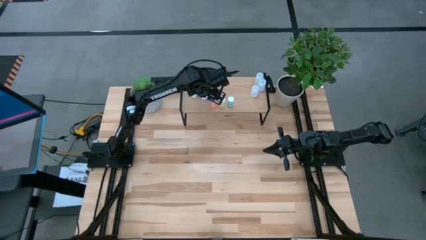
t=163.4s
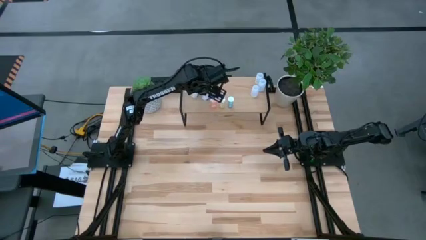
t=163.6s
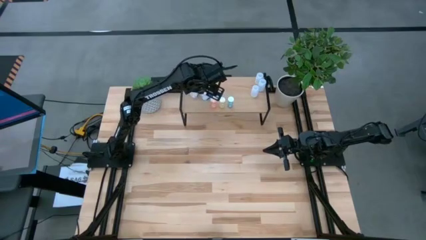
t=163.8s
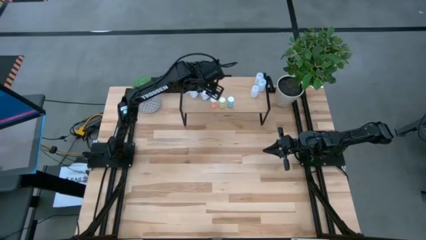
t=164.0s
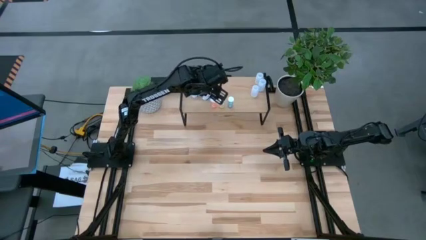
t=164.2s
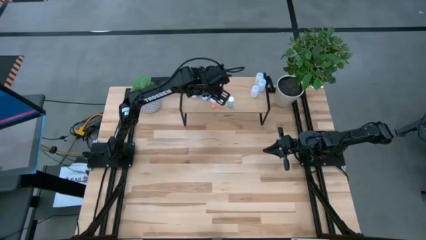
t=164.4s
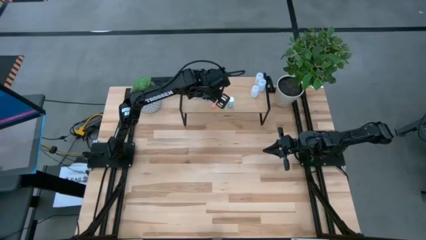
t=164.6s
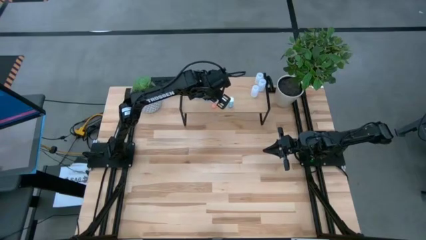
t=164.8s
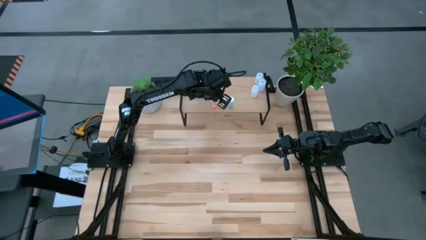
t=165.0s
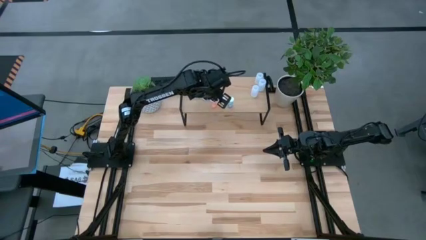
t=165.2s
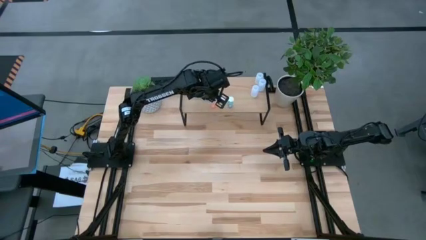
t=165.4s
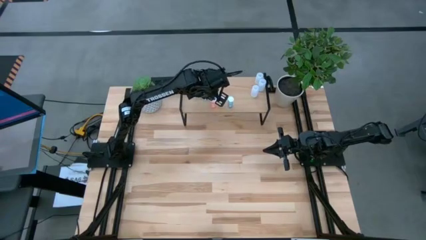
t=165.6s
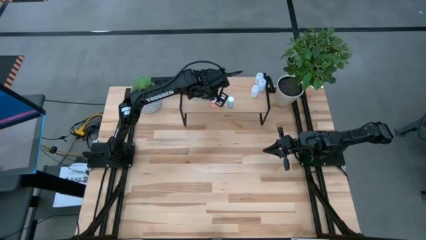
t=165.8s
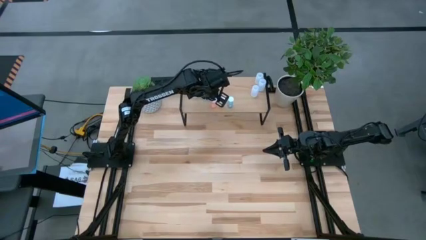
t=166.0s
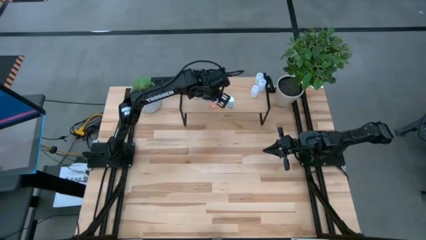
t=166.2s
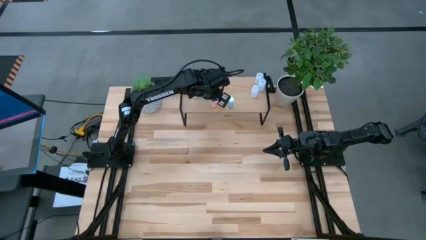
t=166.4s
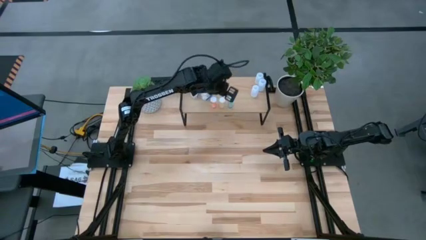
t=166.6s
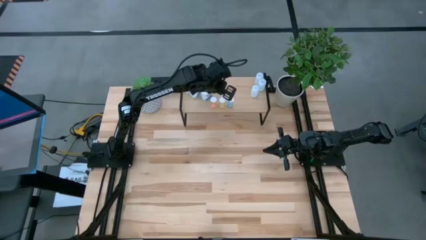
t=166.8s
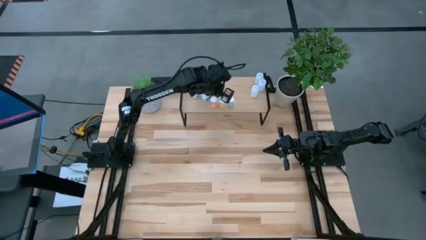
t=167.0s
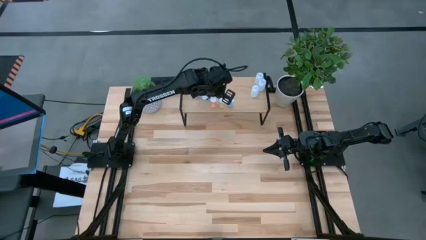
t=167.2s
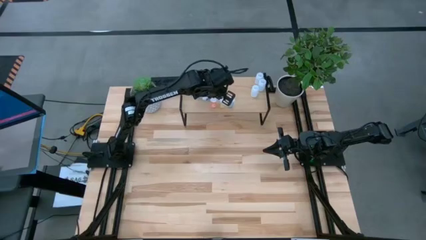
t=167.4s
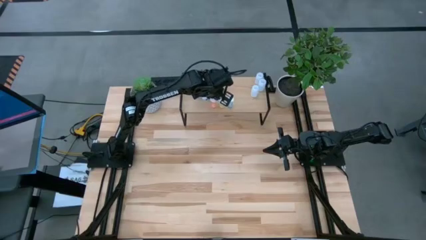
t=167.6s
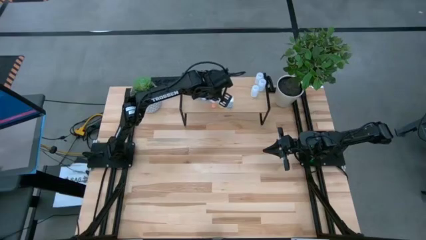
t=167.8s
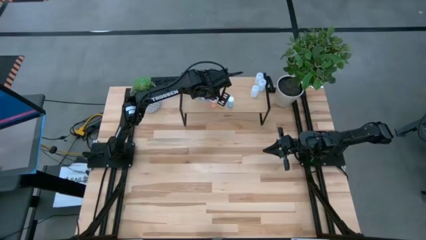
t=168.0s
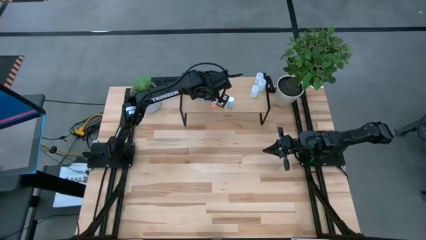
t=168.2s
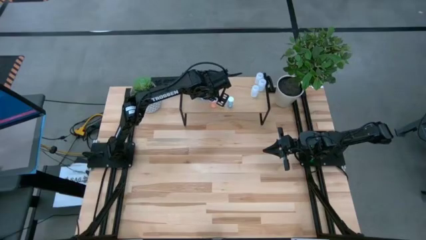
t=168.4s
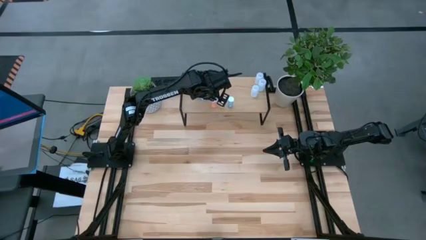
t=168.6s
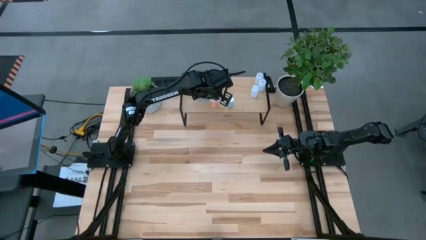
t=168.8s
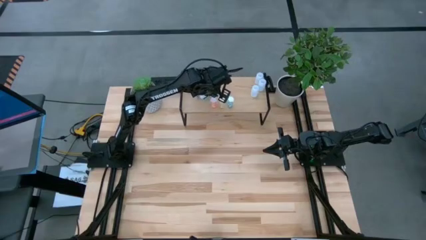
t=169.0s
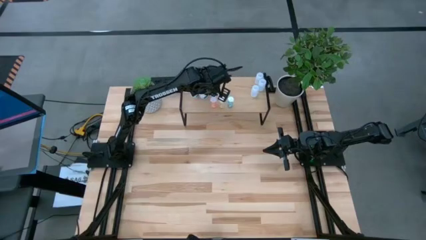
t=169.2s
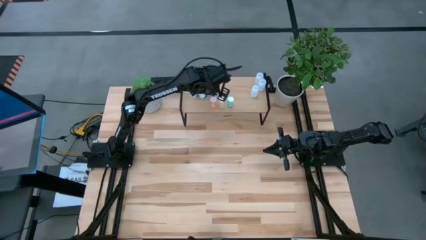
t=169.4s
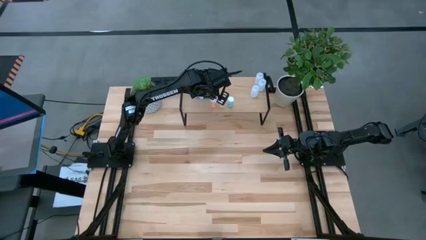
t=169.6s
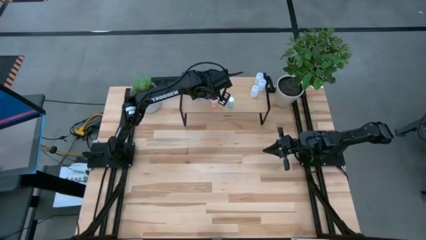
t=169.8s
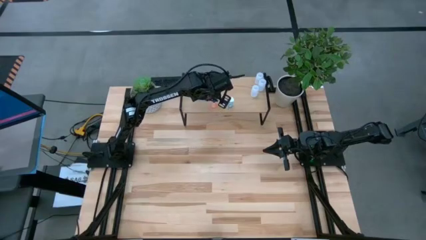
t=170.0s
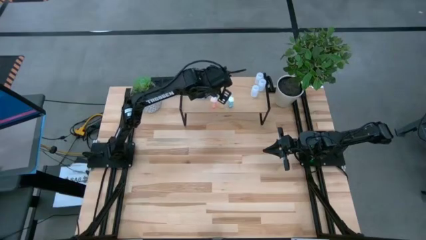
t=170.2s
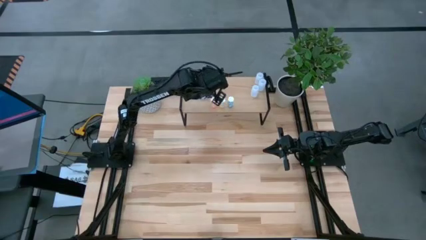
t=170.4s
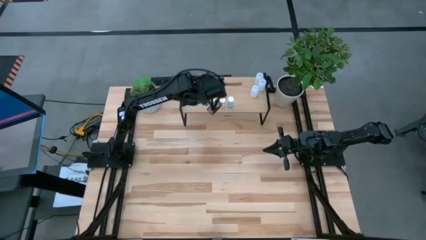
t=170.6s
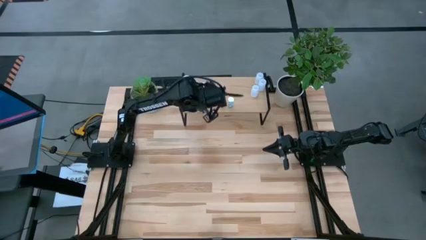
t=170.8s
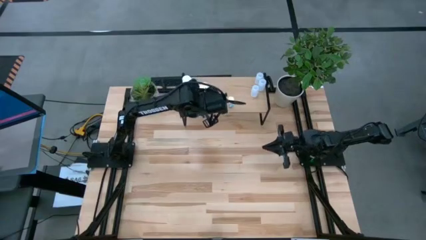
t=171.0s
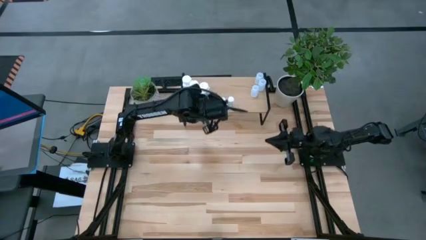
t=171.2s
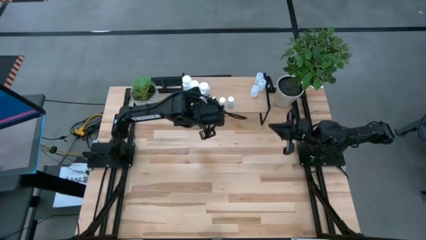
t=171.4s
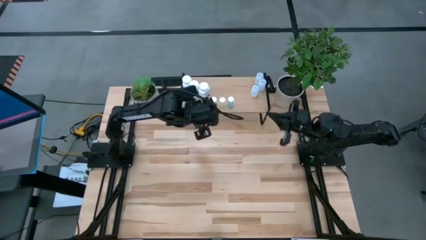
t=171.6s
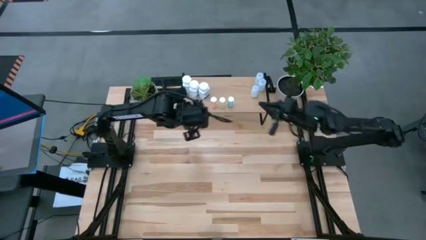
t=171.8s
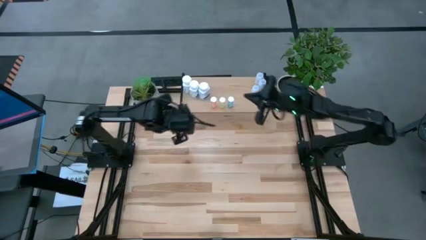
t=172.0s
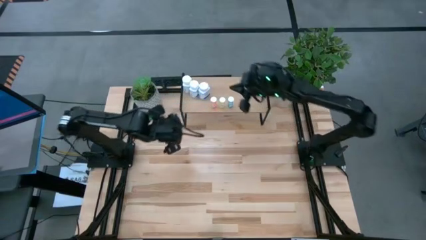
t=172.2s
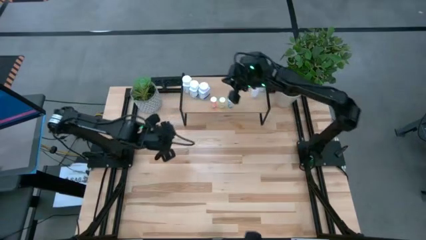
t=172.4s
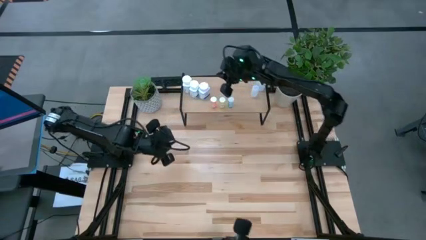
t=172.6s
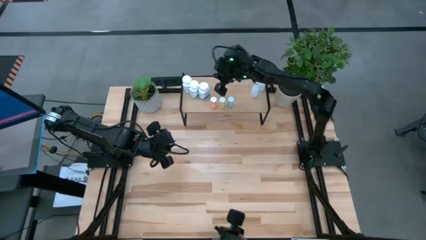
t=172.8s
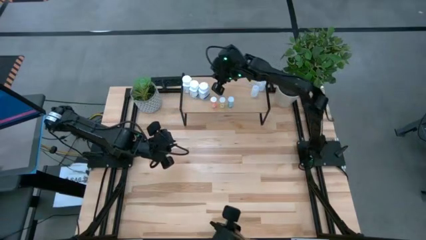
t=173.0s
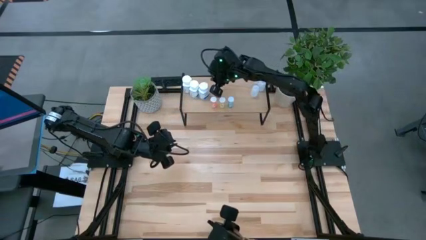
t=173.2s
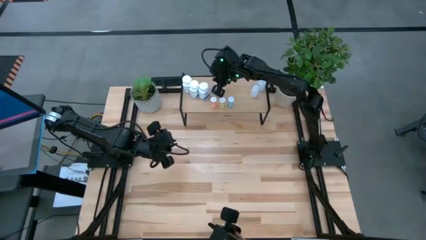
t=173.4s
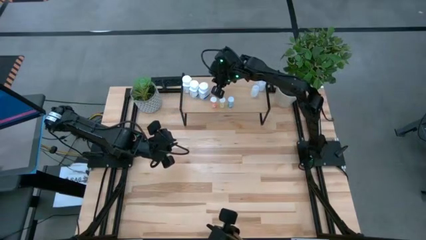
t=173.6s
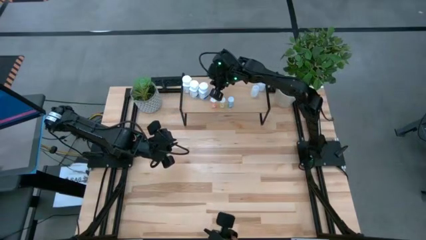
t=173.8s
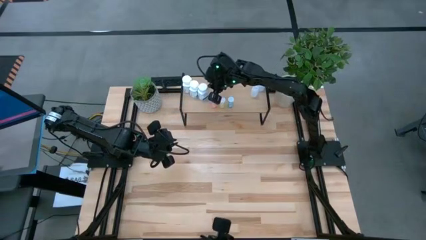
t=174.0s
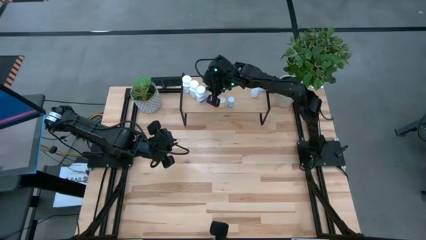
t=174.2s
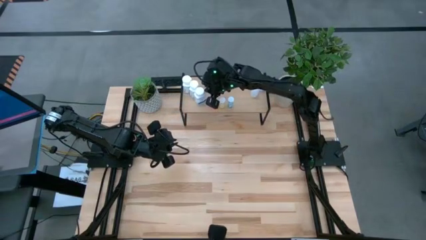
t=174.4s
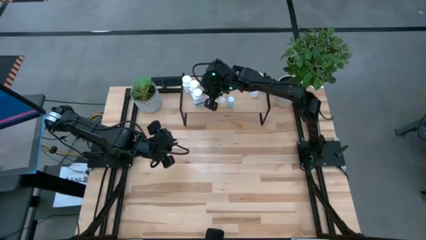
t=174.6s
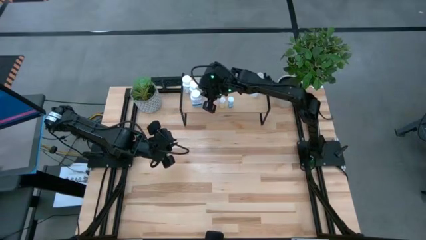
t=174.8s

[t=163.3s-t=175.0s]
Task: Pick and place medicine bottles onto shelf by color
Put the white medicine bottle on the shelf

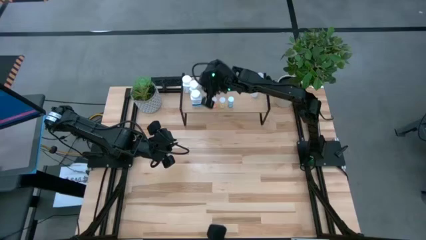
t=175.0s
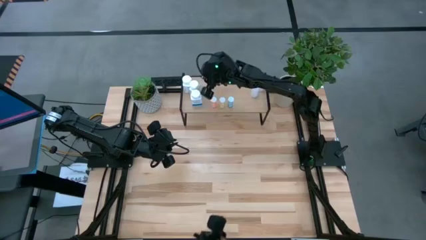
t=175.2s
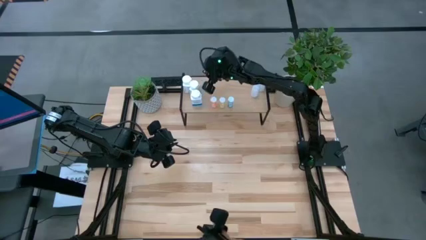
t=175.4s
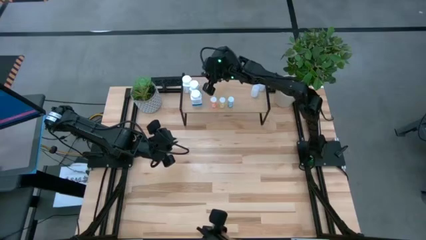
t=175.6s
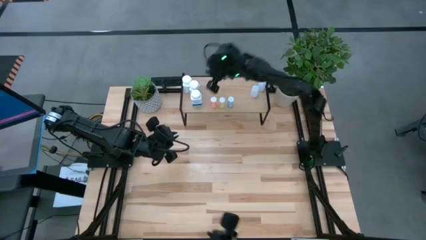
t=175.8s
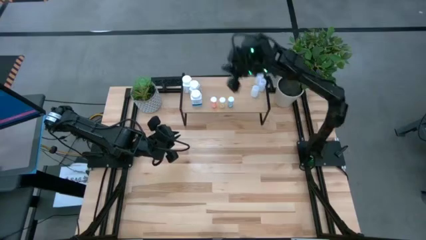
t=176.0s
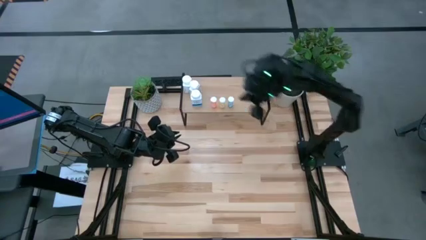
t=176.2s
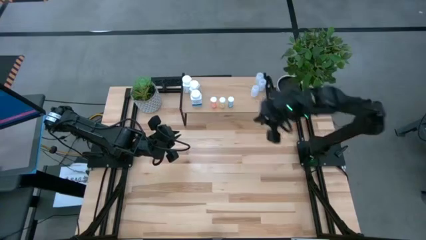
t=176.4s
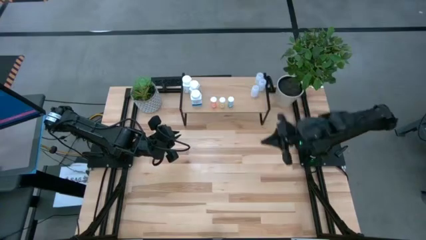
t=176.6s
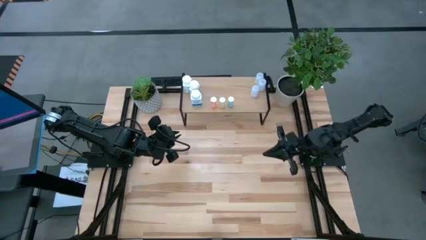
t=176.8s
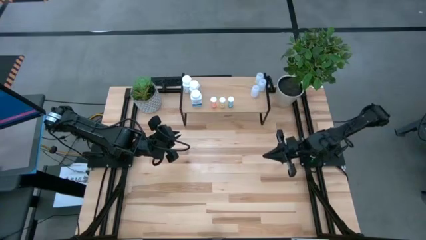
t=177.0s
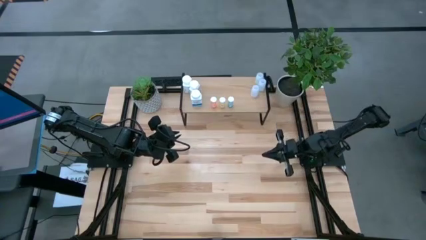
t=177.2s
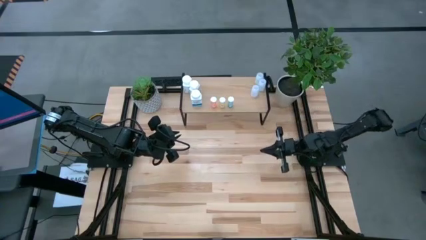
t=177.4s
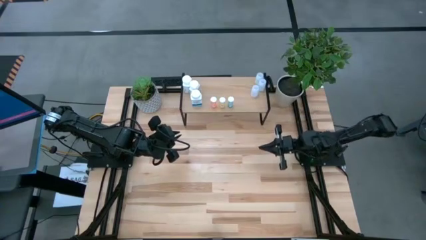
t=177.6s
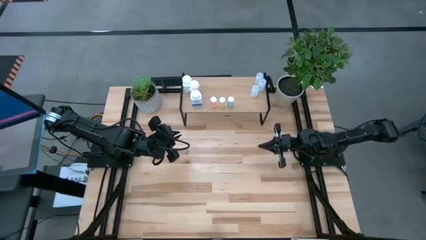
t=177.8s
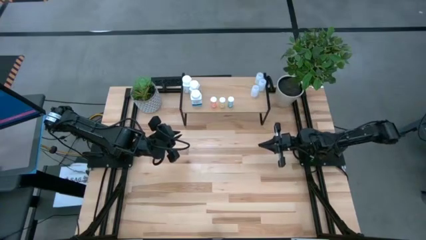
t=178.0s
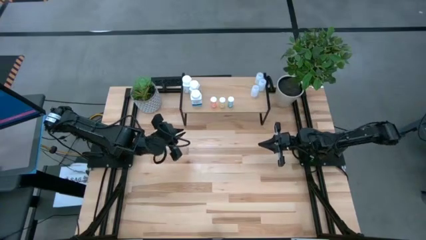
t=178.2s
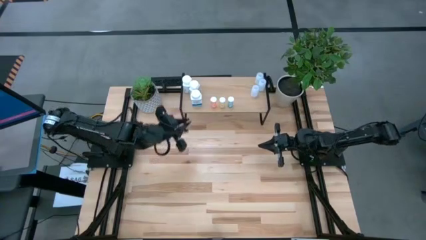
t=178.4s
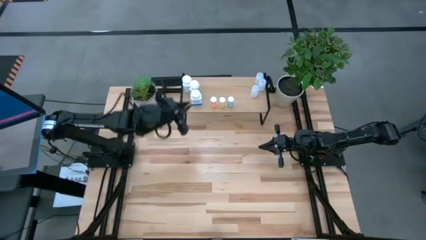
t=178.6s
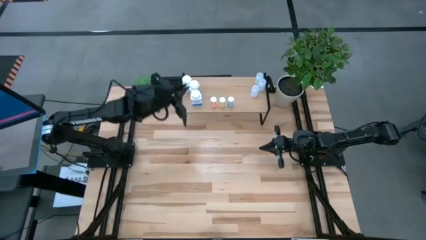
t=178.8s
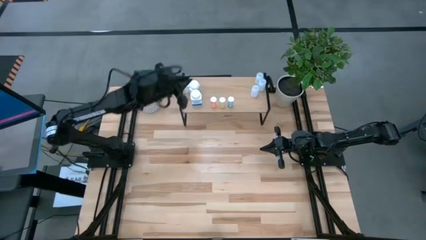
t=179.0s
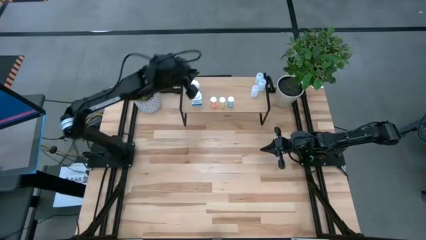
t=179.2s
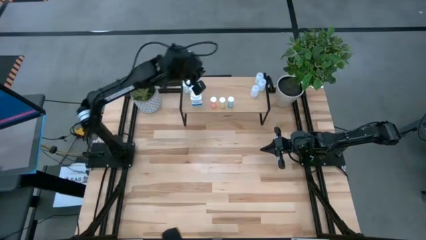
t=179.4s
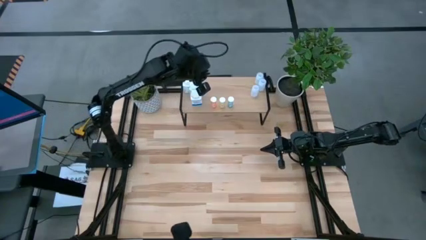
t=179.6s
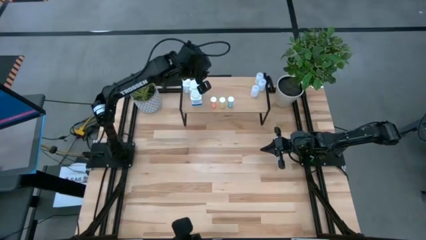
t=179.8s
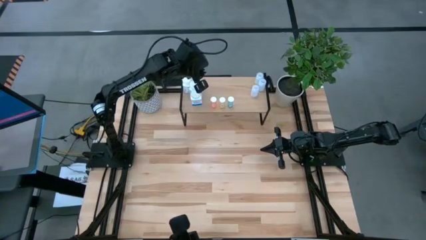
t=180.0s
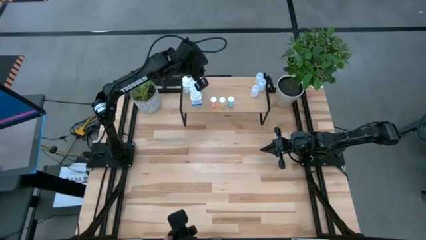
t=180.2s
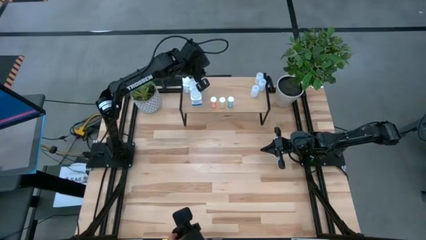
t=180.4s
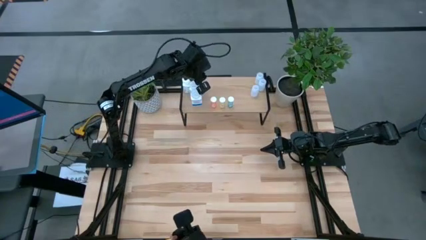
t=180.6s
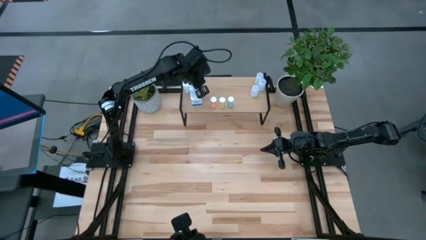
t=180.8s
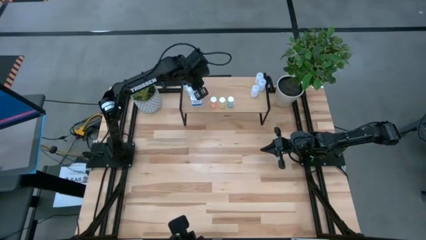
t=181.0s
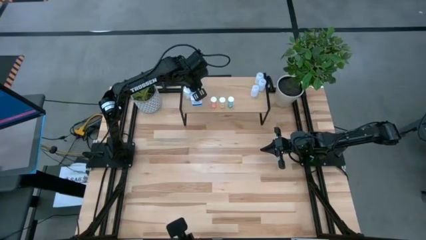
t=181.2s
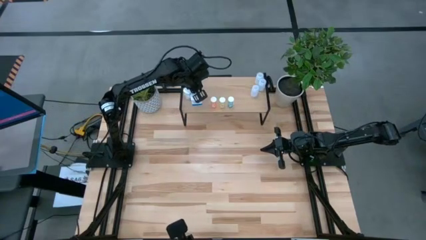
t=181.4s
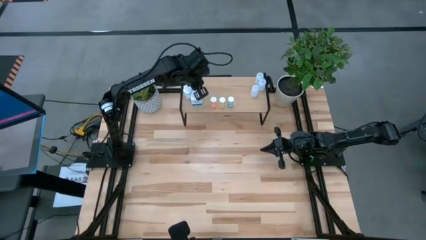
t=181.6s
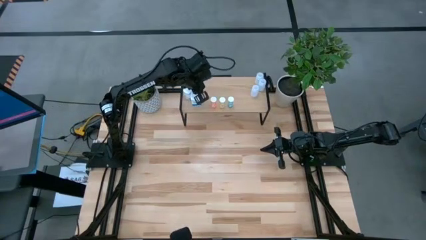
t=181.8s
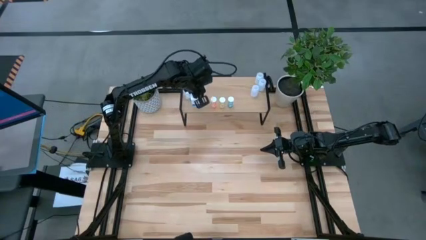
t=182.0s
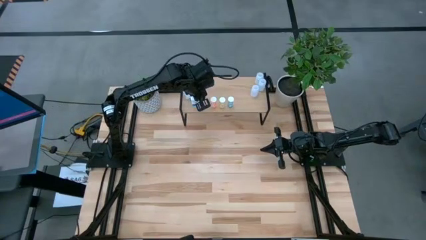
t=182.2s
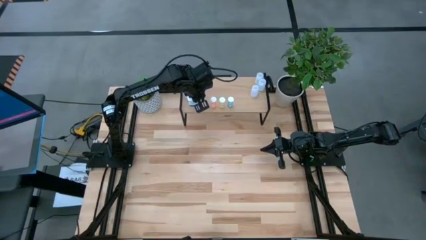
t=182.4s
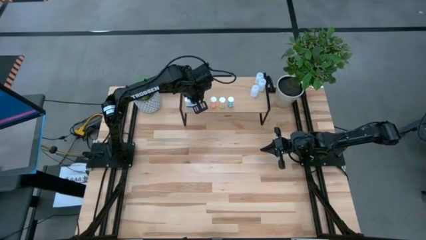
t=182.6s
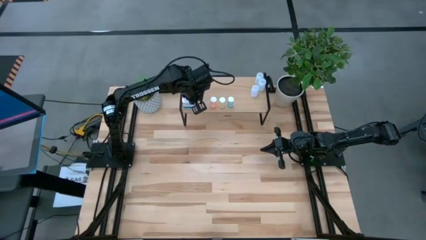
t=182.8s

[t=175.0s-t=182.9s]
Adjust the white medicine bottles
